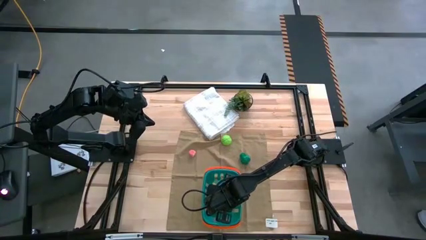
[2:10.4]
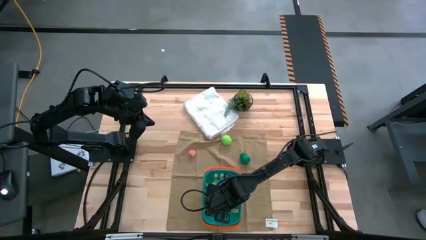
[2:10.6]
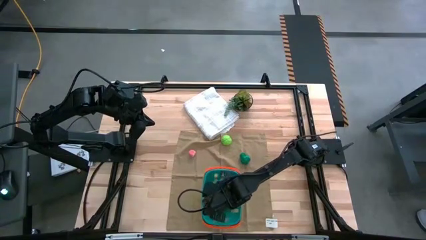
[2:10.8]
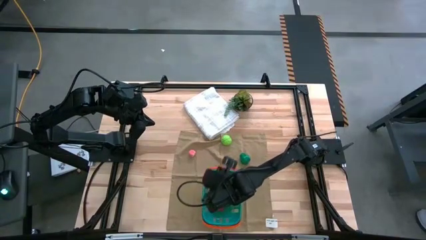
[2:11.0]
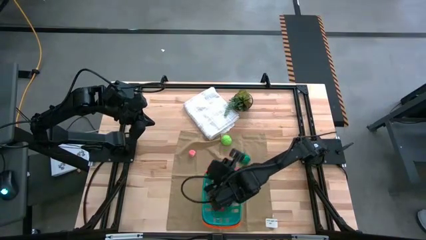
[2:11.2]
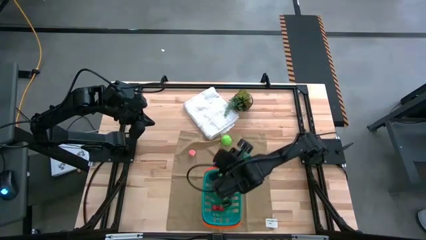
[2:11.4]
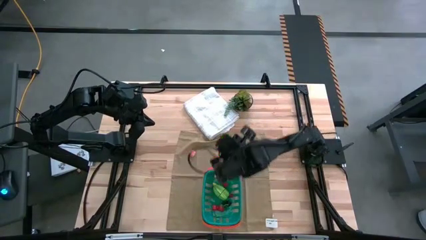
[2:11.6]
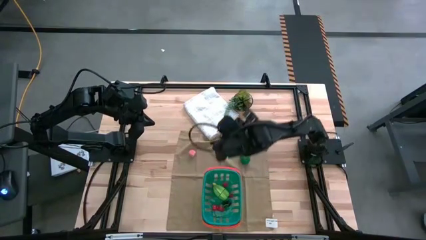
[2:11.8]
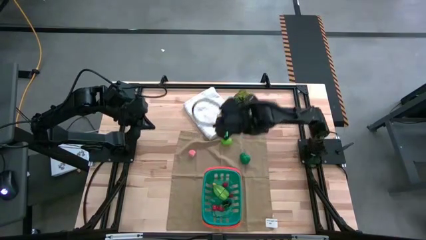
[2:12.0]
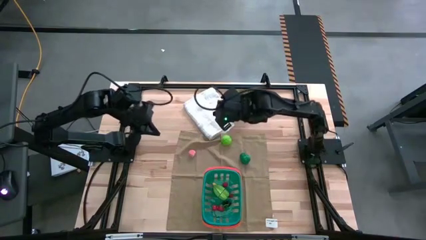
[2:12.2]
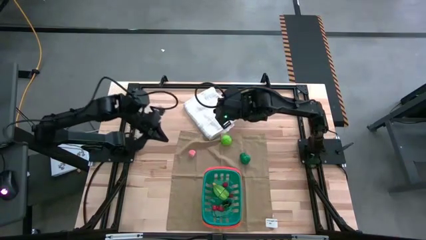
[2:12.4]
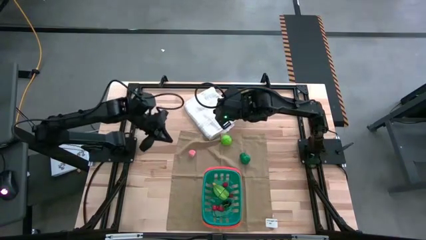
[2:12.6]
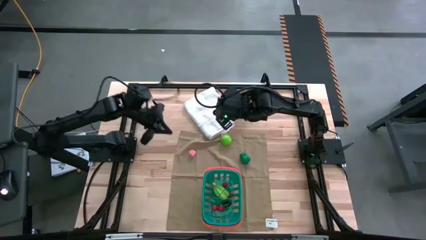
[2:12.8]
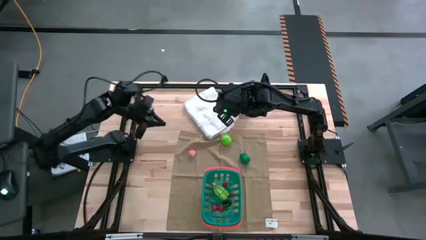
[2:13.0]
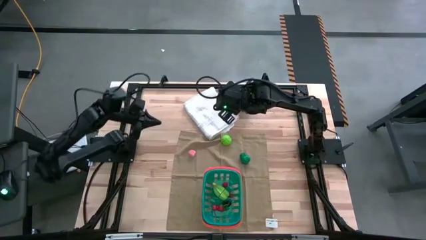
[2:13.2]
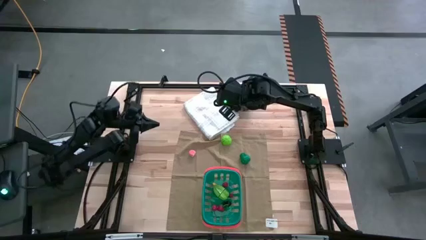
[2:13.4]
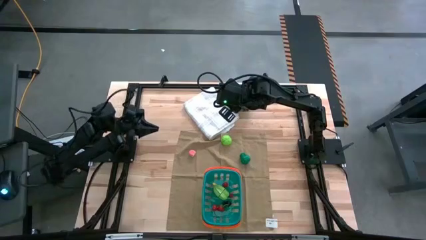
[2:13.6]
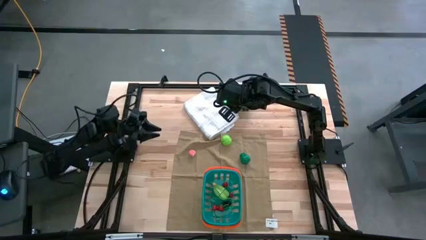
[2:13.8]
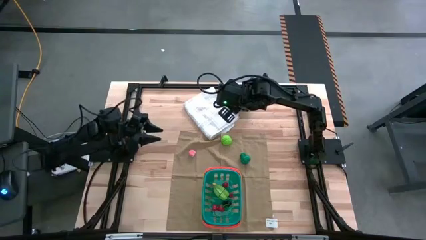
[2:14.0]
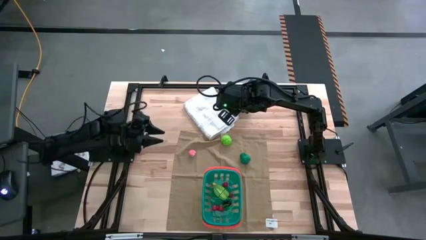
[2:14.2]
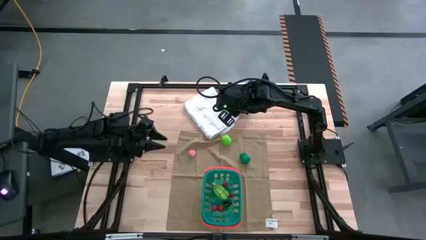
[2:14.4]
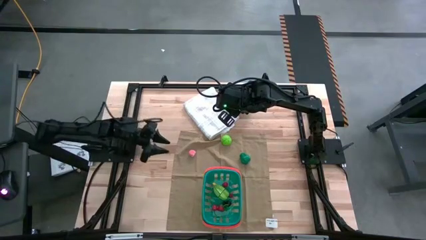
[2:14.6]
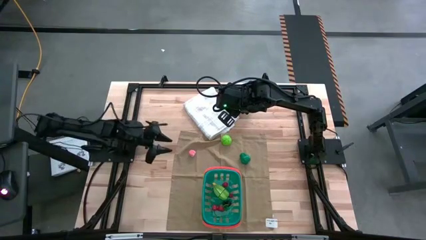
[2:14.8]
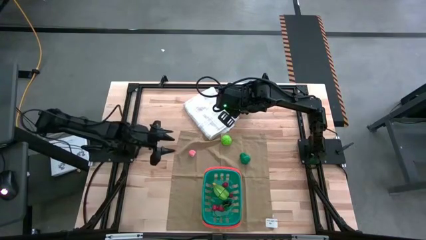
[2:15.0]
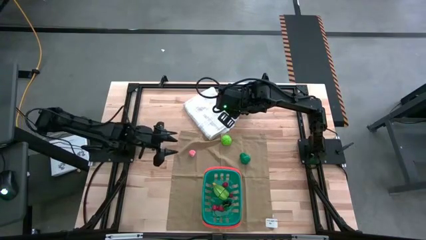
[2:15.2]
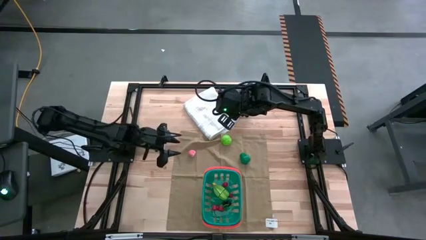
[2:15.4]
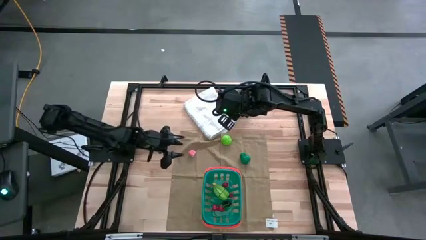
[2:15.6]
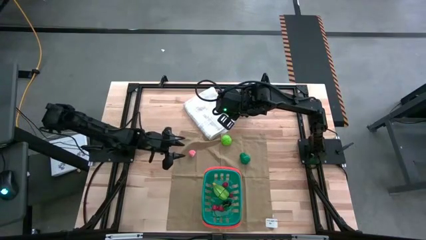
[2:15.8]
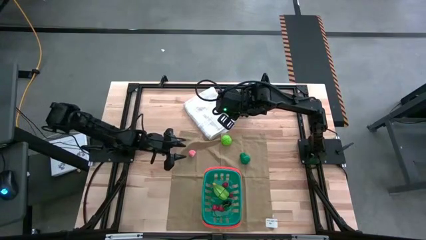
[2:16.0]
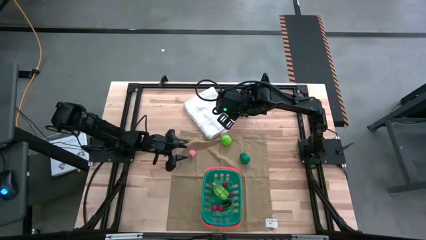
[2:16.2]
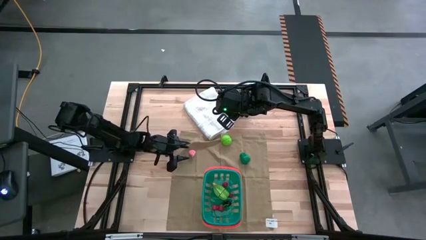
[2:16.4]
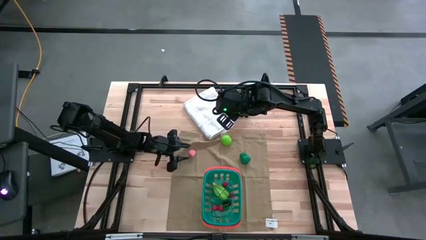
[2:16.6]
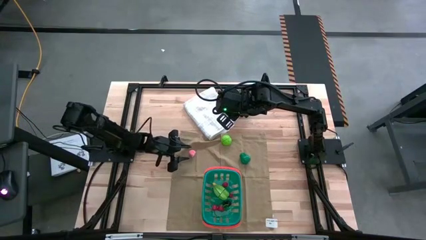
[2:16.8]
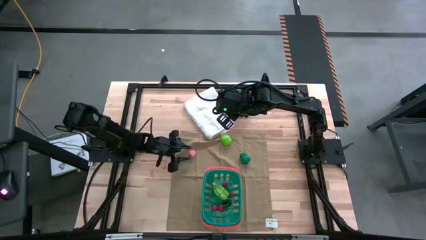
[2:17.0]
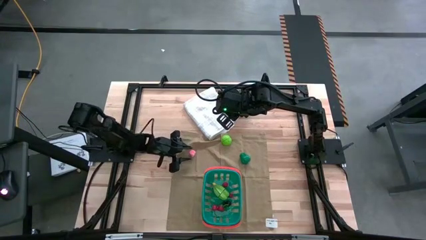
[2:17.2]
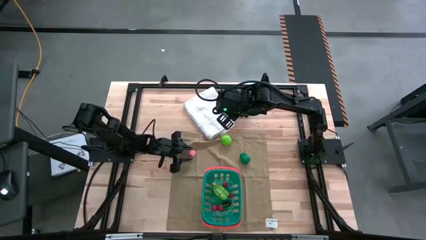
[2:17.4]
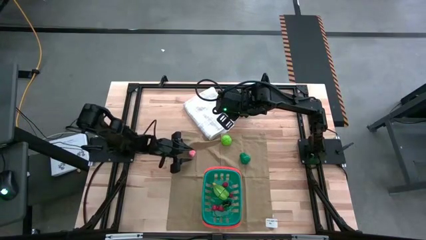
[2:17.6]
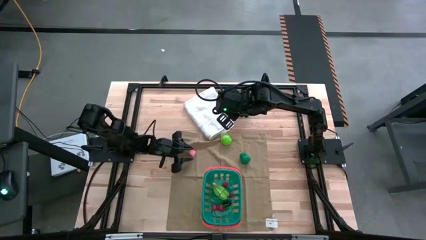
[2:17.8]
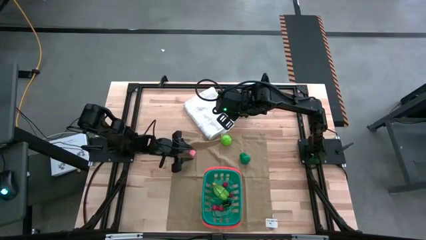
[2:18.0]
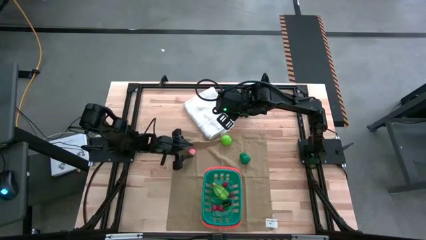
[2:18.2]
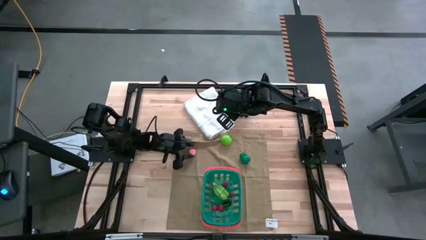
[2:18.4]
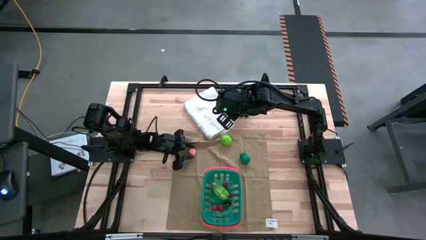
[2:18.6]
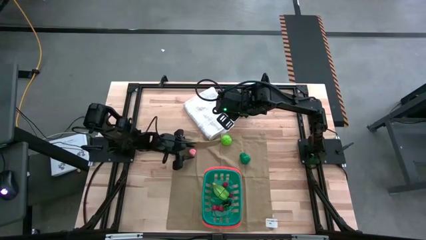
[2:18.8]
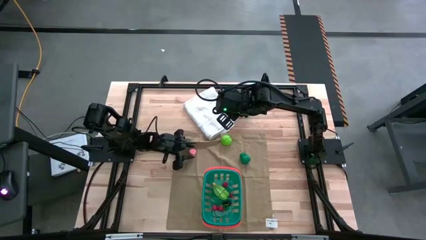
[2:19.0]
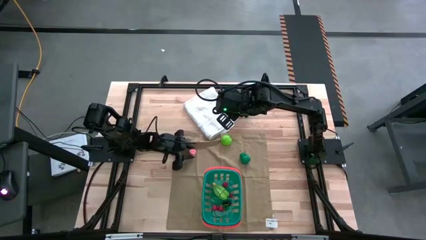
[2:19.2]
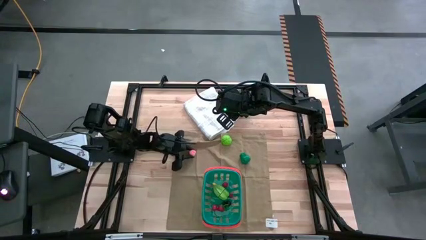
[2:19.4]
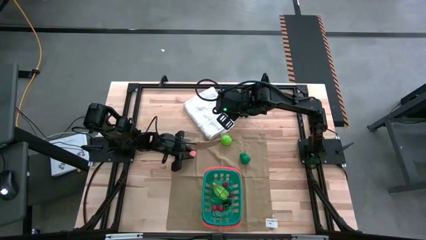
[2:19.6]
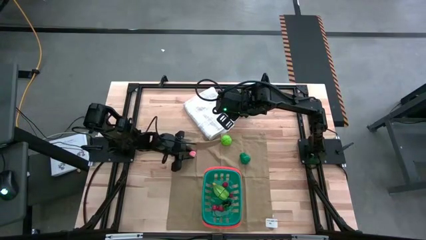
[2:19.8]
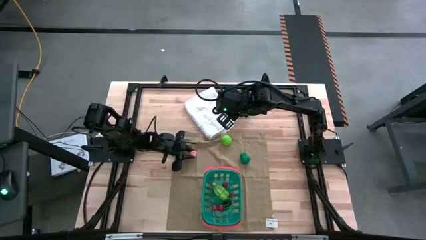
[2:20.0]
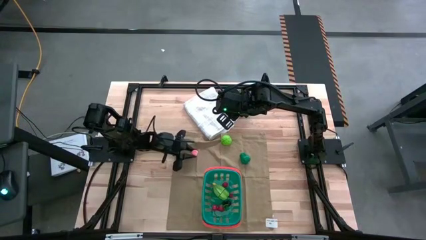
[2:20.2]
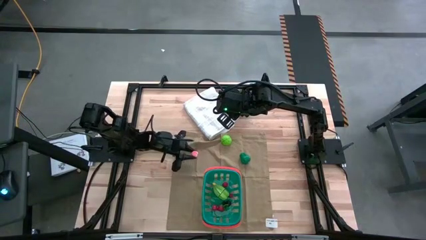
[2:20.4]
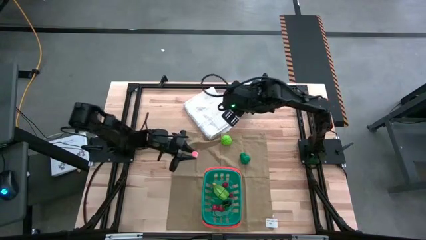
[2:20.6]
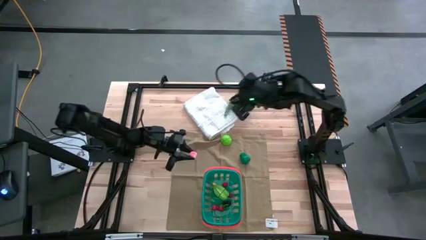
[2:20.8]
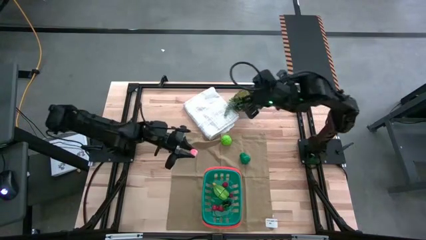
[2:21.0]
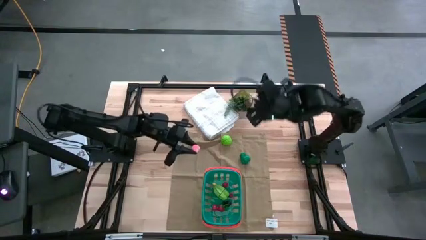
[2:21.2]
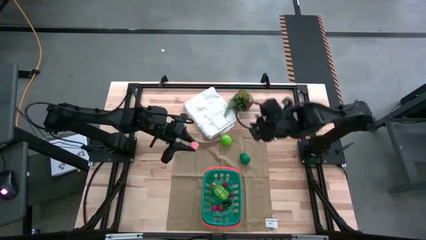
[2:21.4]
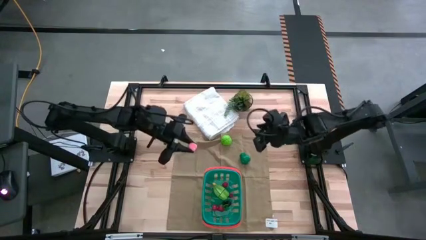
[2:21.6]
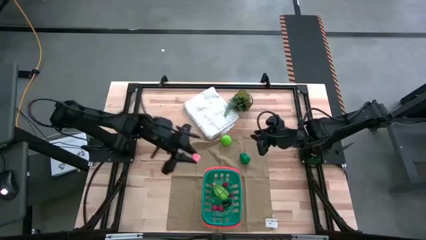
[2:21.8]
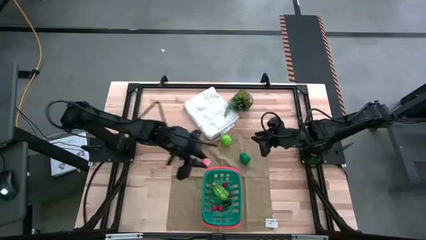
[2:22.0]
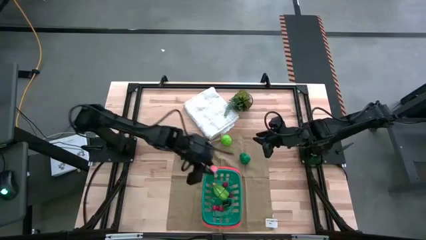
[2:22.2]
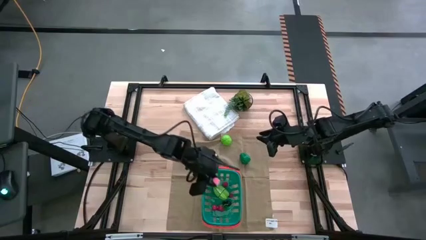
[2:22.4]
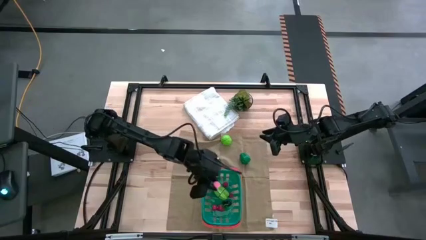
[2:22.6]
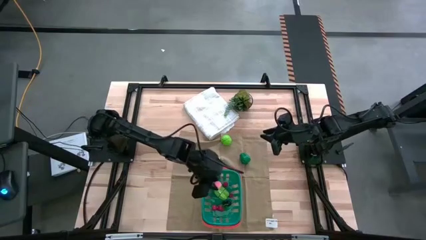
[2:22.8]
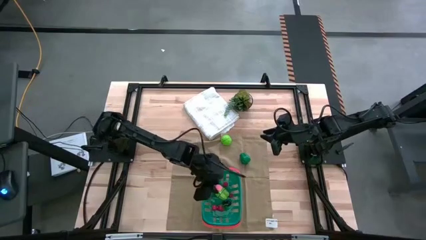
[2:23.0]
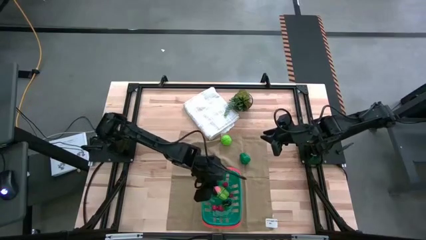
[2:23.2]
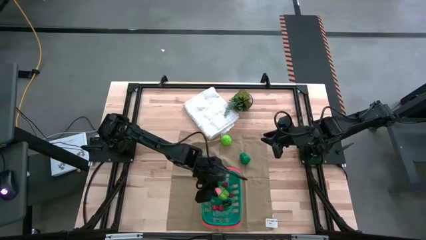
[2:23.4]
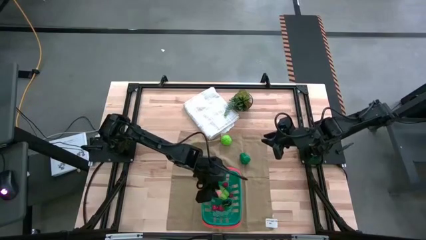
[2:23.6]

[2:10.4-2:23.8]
Task: Pick and placing Produce into tupperware
Put the pink apricot into the blue bin

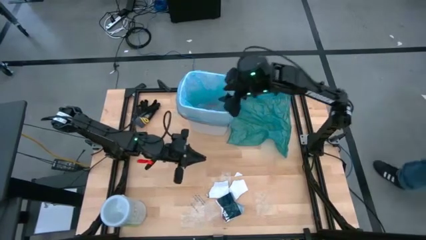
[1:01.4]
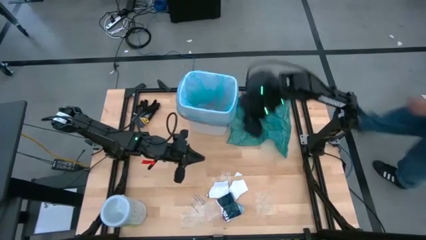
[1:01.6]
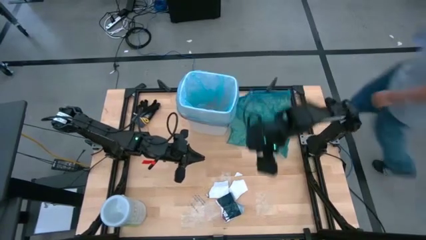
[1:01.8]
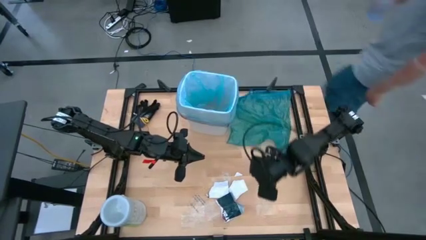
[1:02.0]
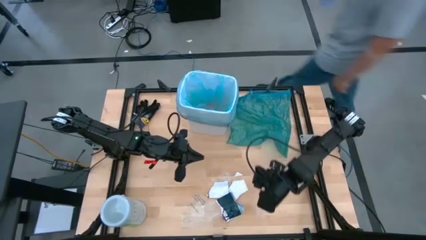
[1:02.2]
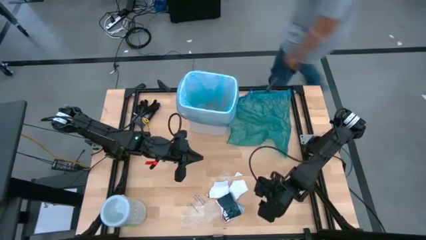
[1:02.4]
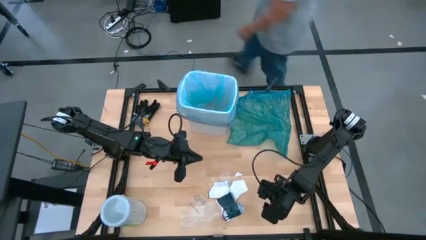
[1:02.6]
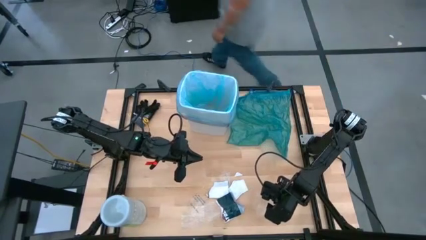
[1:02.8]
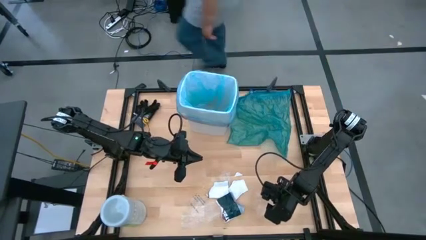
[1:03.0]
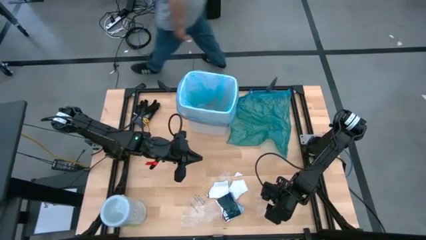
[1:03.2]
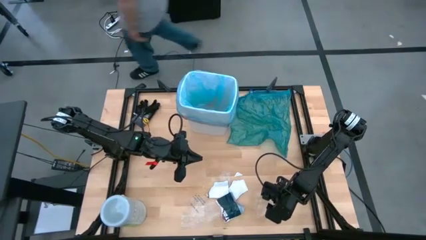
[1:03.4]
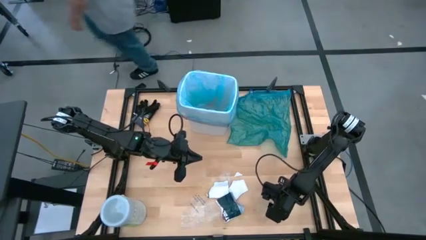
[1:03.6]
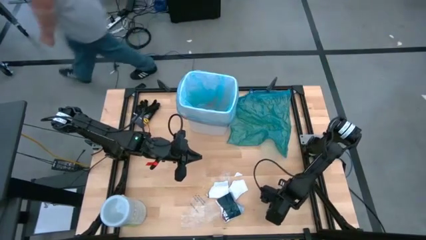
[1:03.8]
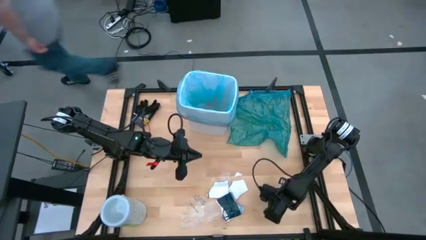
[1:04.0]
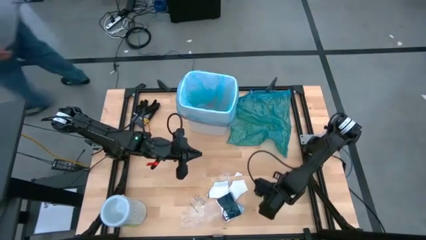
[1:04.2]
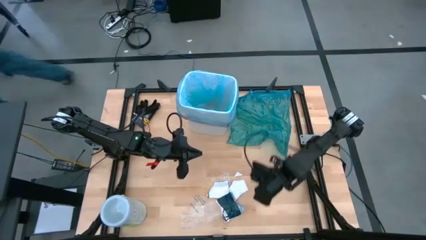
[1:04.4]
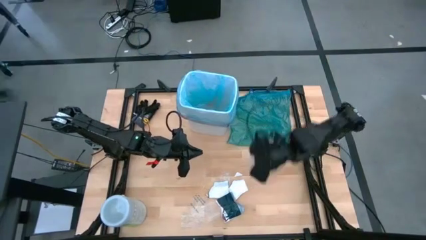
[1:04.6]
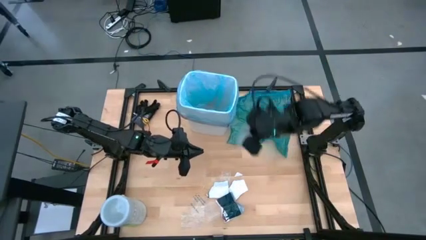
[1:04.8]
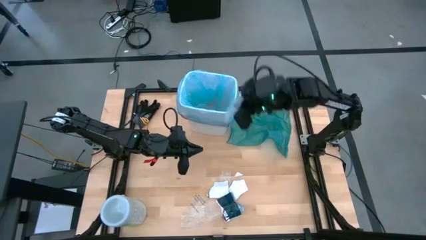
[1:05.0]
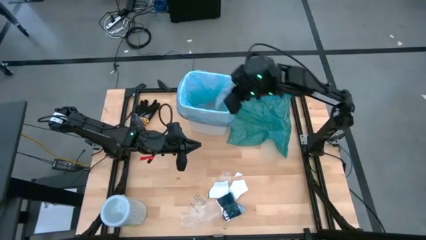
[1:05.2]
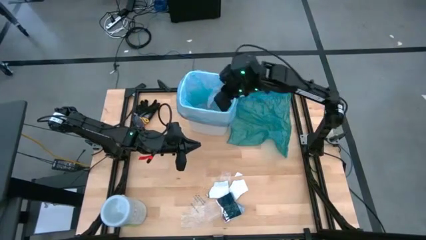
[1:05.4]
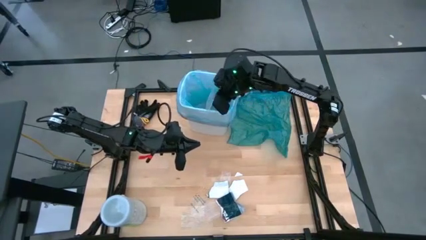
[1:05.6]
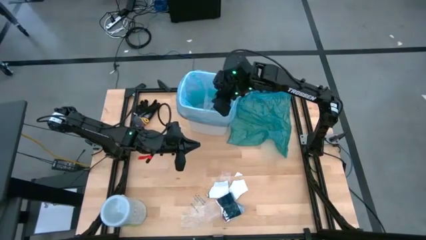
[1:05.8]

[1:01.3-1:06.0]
Task: place trash/remove bag and relplace
Put the transparent plastic into the trash bin
